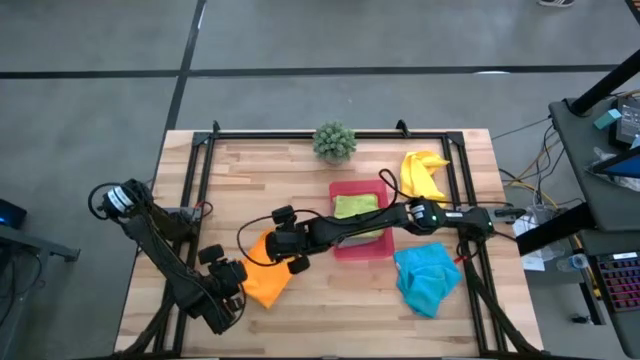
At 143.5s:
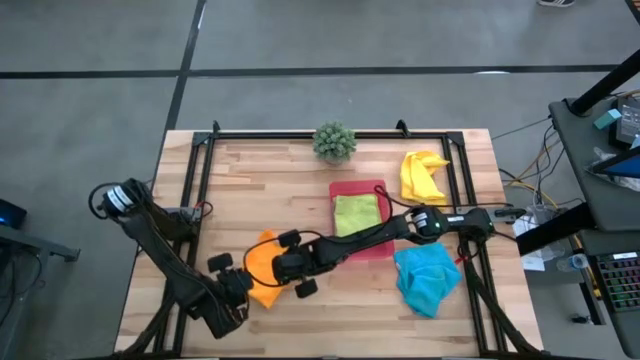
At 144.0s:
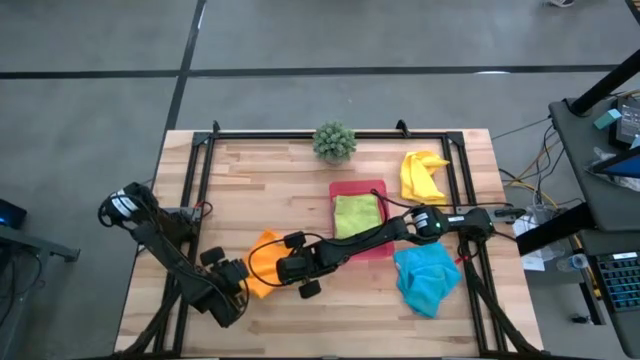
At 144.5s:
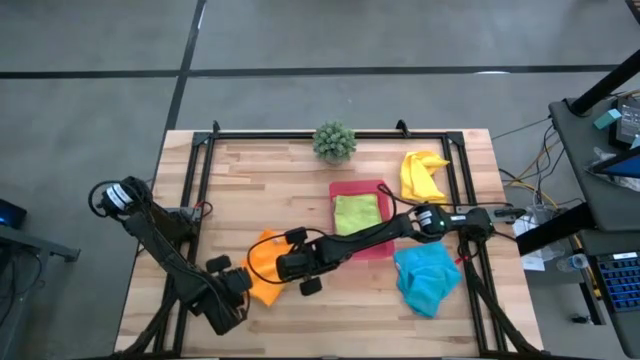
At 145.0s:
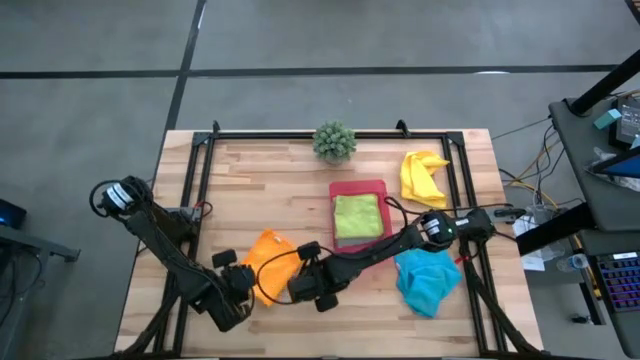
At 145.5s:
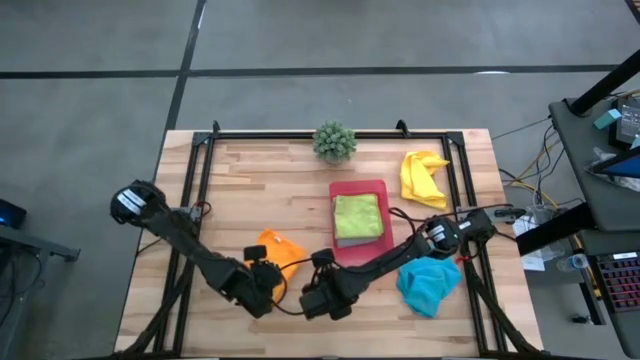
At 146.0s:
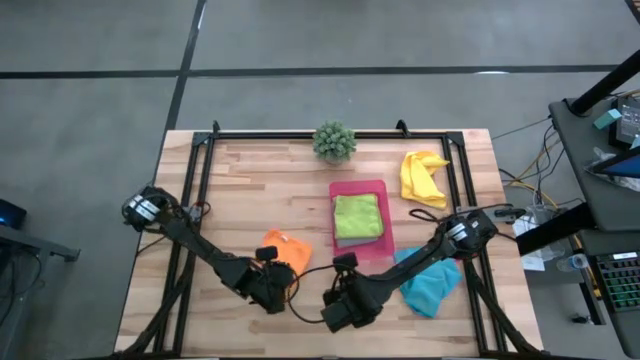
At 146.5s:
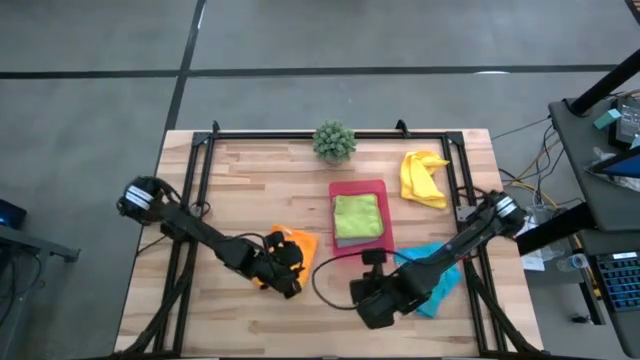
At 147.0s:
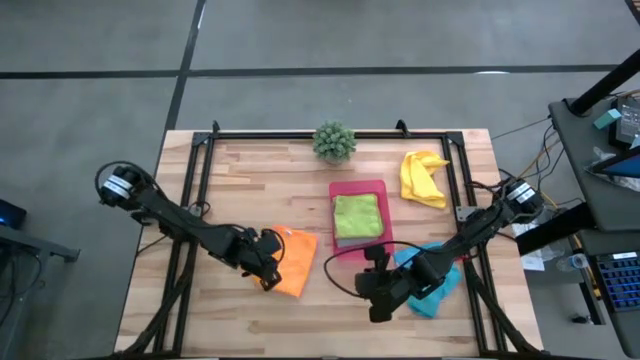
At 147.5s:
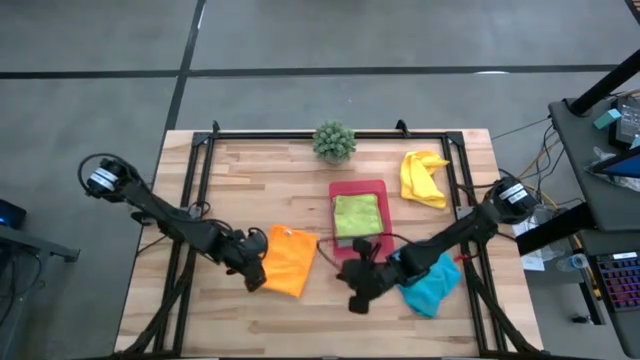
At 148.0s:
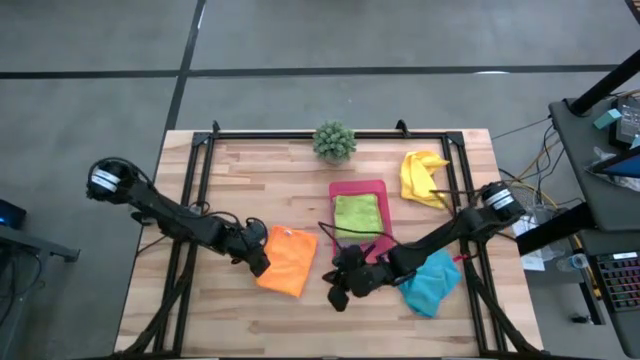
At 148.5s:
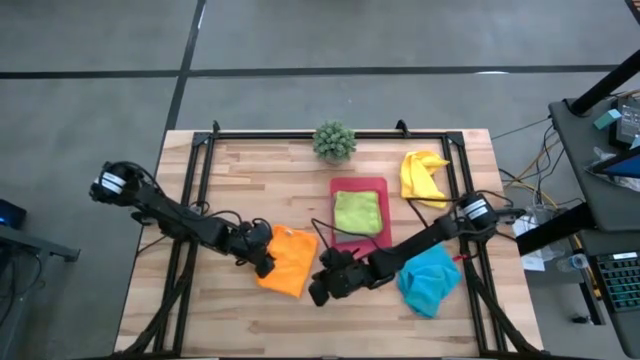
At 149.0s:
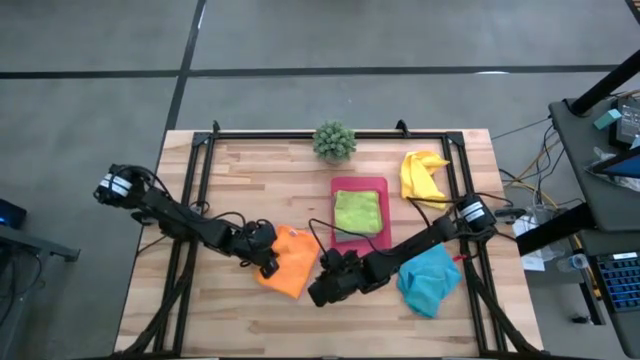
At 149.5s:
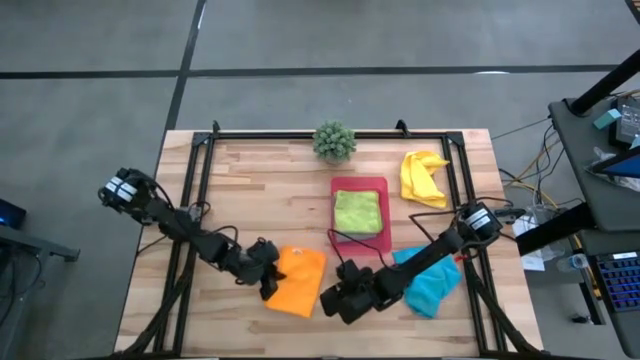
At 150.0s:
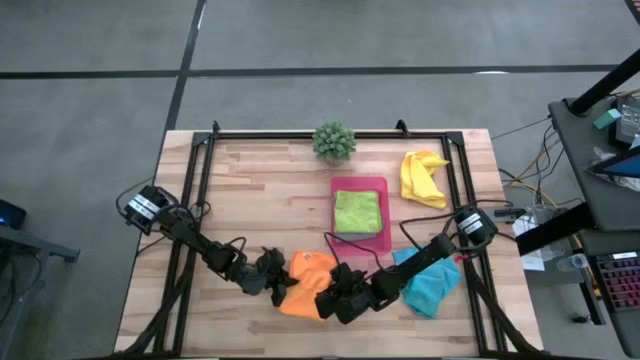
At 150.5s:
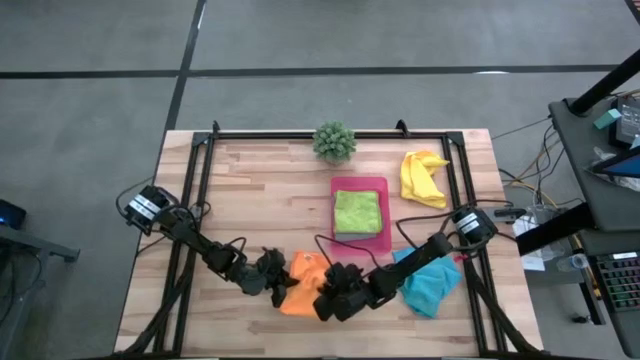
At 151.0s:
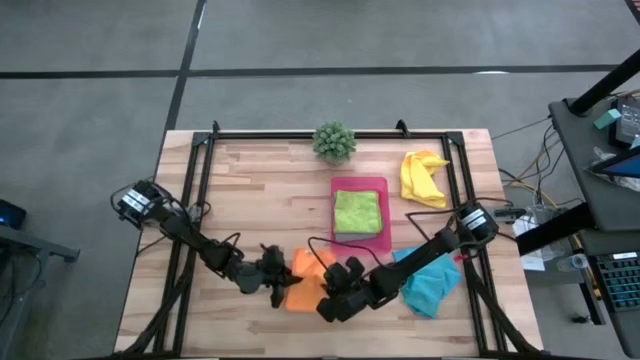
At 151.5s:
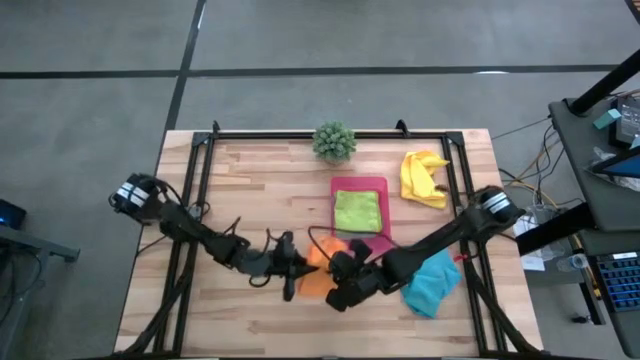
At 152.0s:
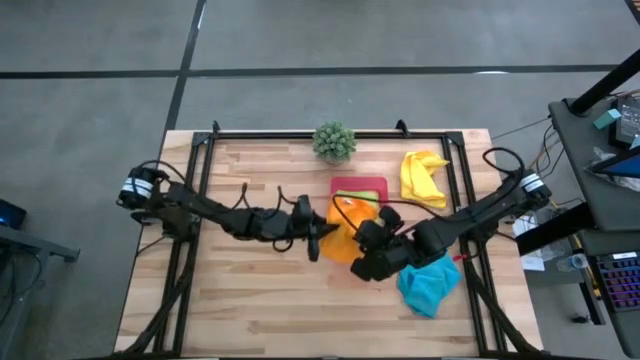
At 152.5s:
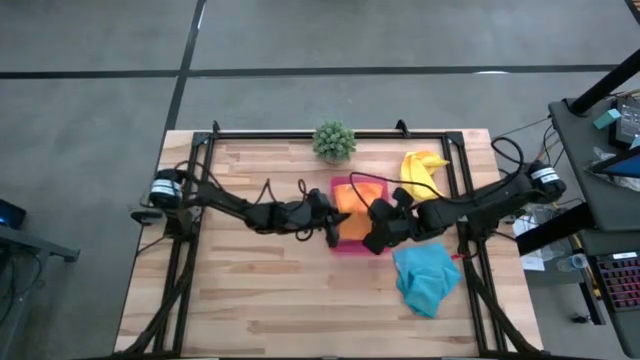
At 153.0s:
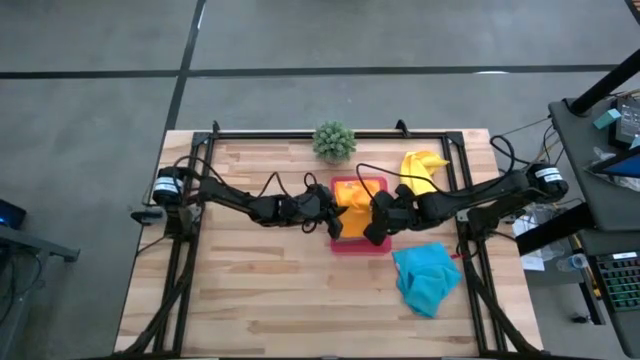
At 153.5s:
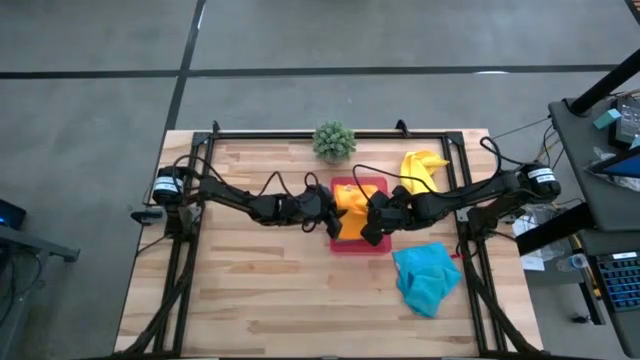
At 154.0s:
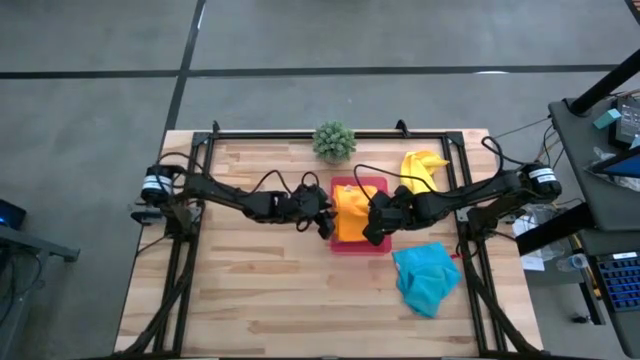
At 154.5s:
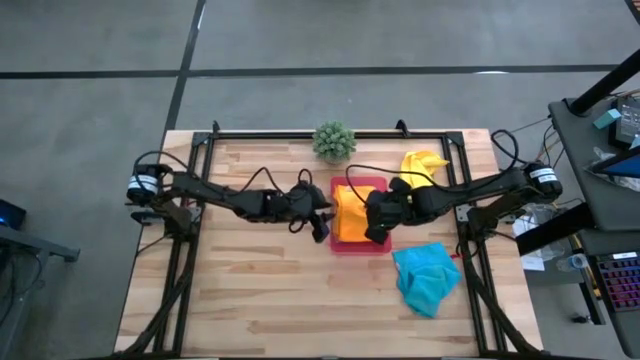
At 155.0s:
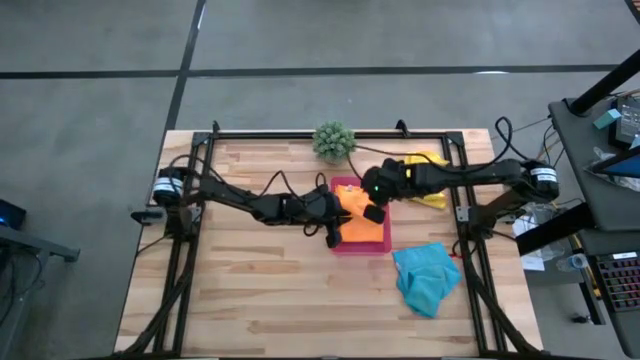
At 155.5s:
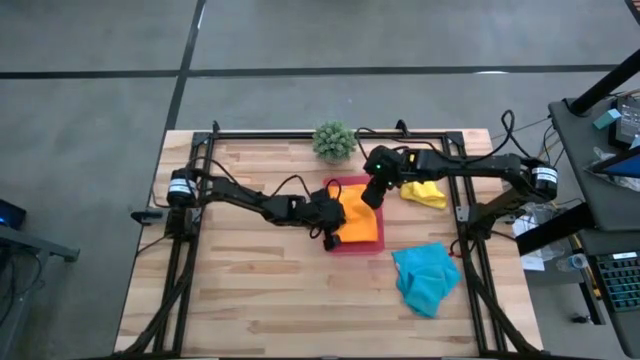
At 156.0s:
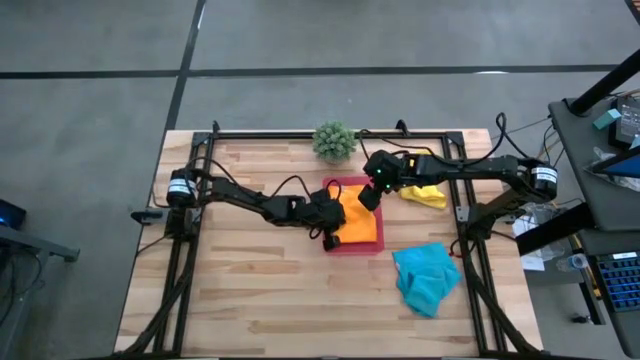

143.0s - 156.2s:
Task: Fold microfiber towels
Put the orange towel into the red bin

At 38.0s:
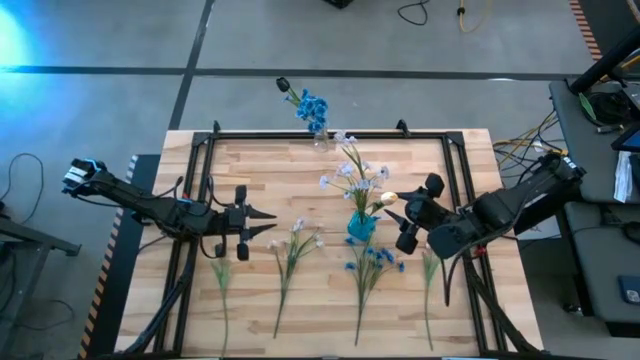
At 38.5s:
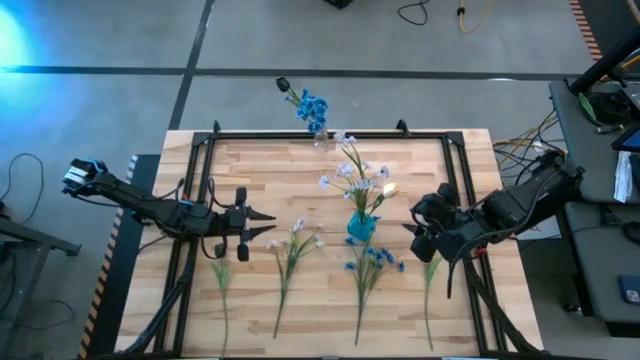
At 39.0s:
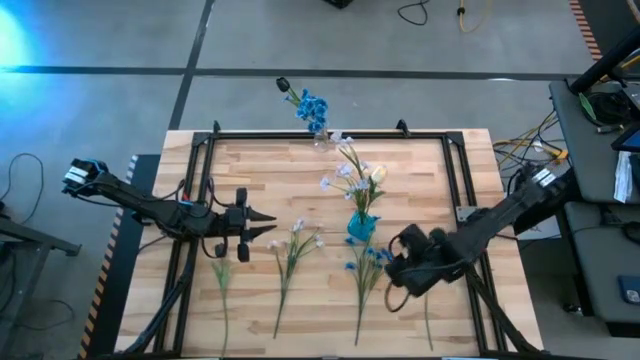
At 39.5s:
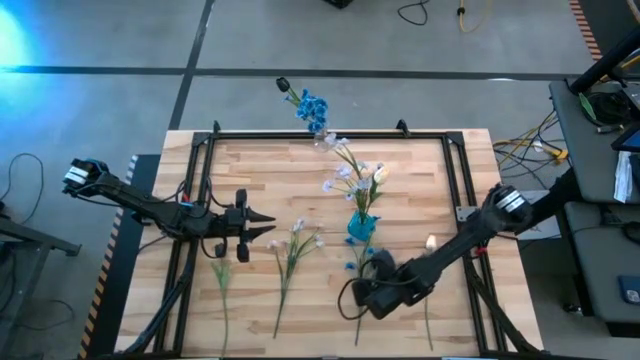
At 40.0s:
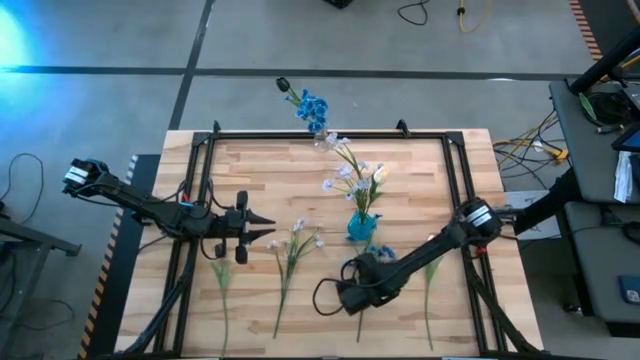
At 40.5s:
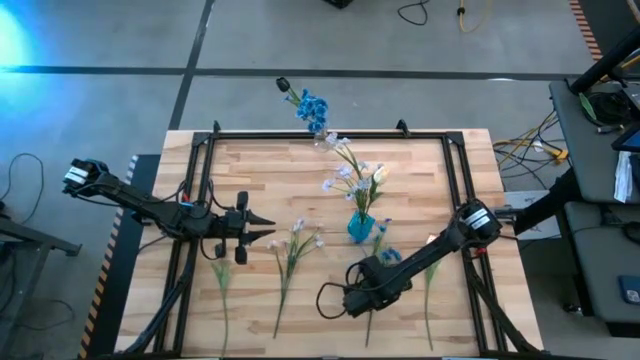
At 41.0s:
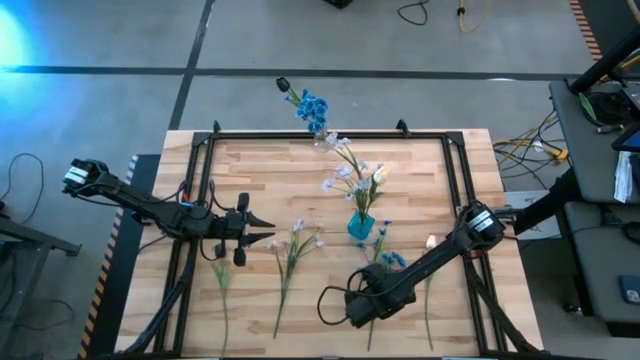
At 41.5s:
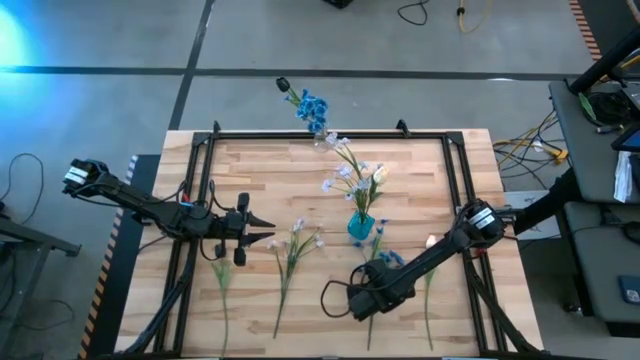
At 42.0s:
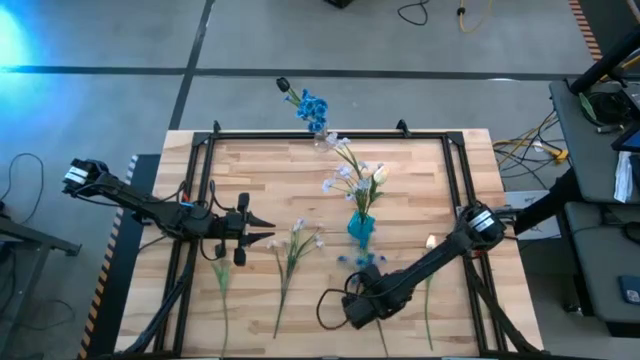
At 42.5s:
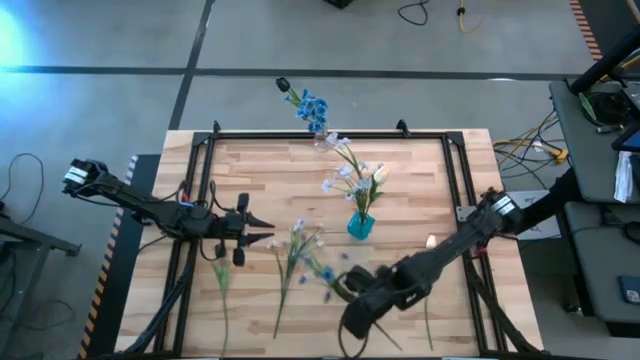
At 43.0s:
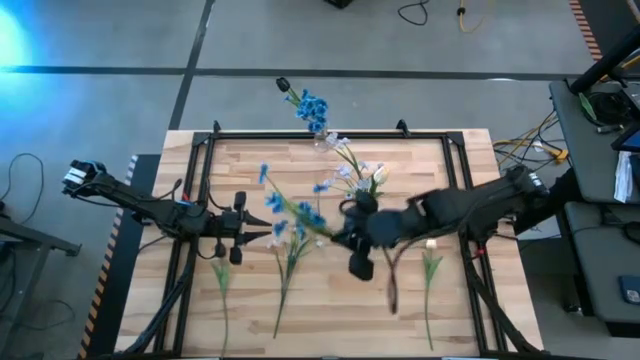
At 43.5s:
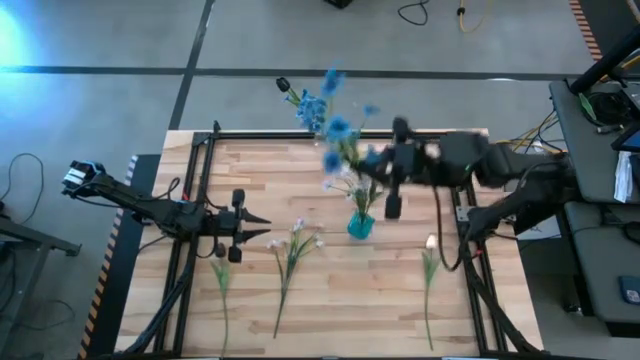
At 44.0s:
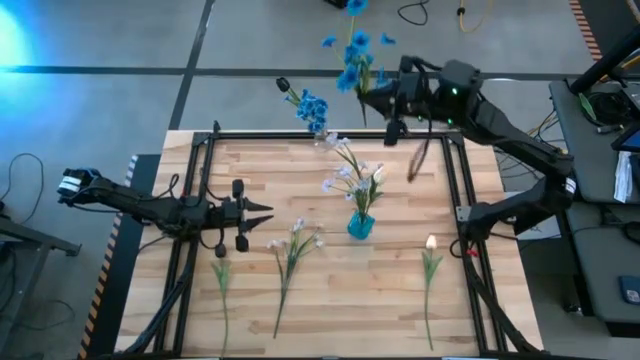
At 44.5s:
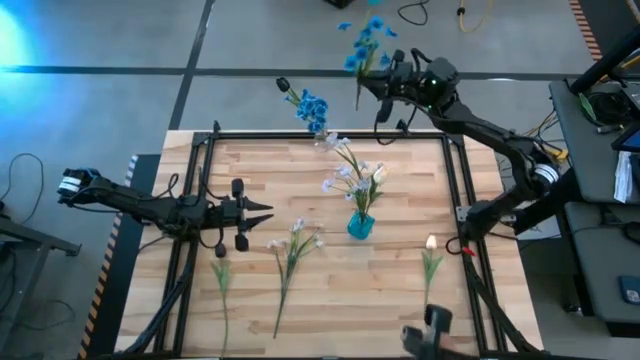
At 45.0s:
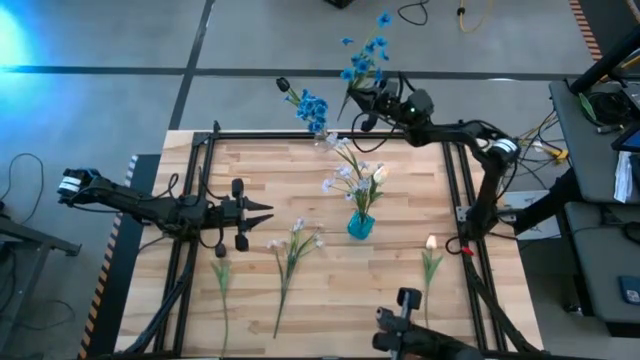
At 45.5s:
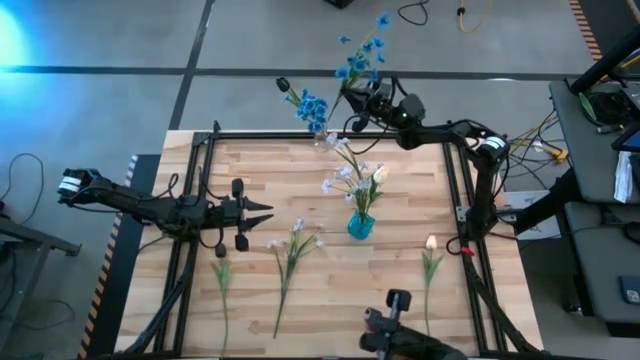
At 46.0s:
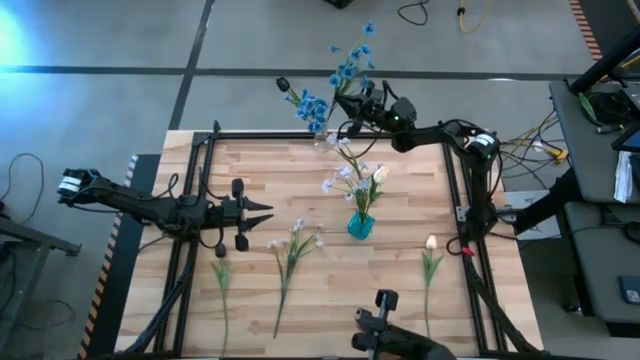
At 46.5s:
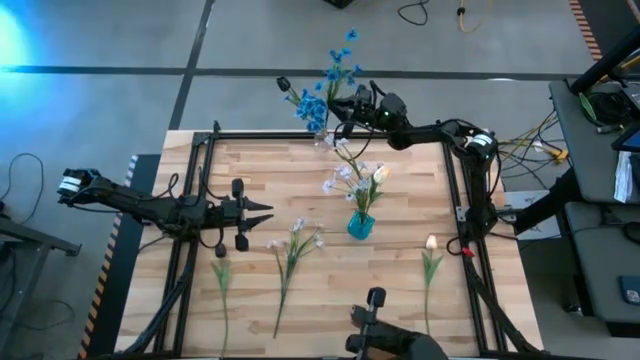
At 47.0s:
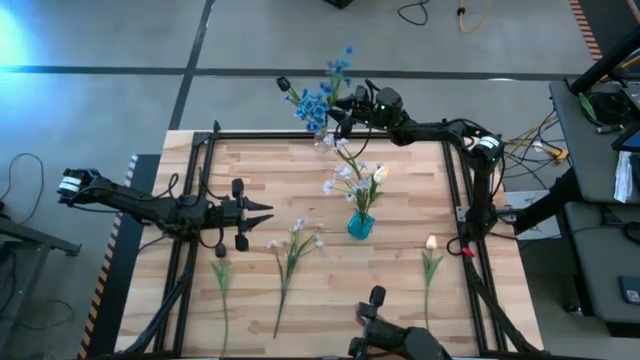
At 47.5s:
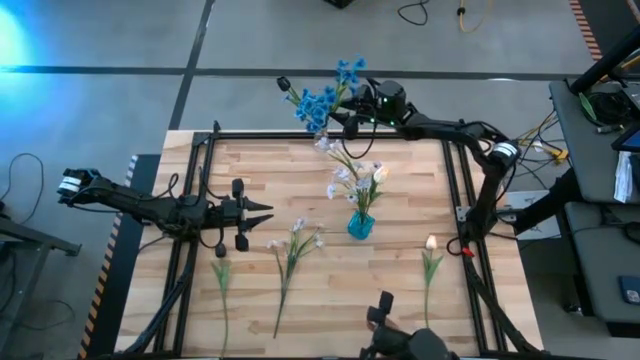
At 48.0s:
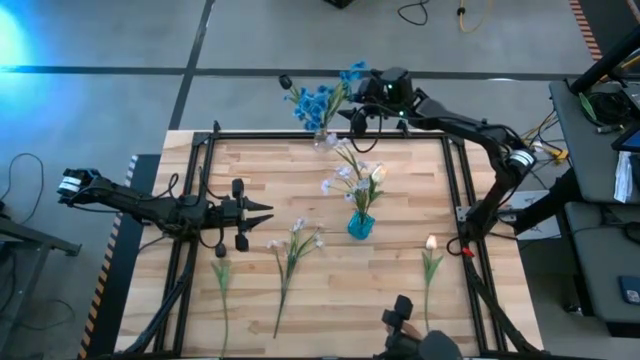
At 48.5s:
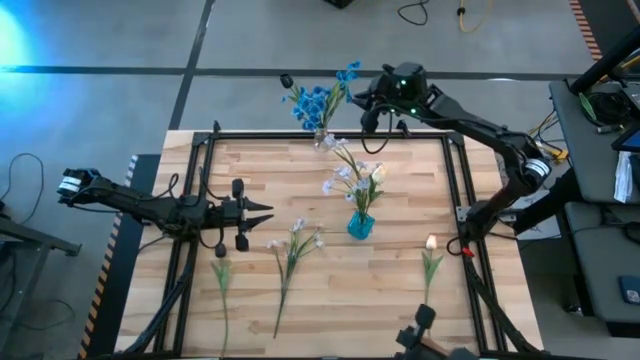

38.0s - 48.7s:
Task: Sort flowers into vase by color
Put the blue flower into the transparent vase
